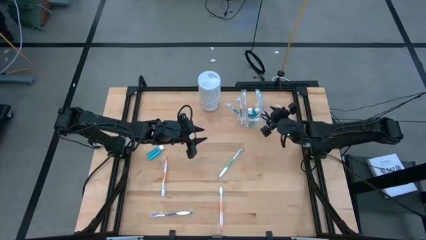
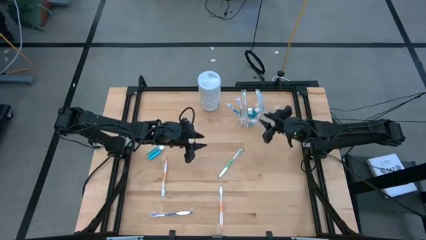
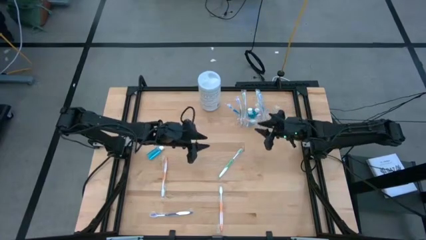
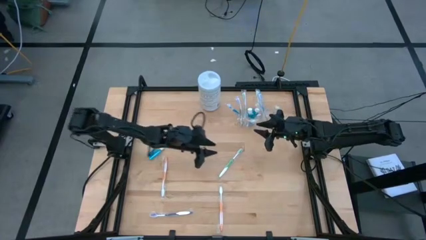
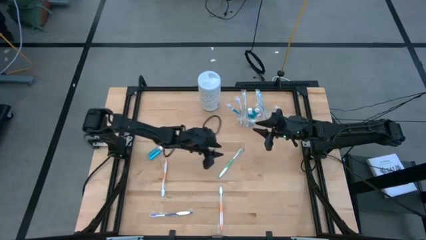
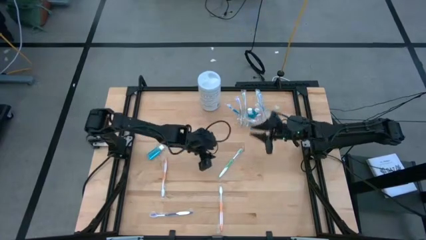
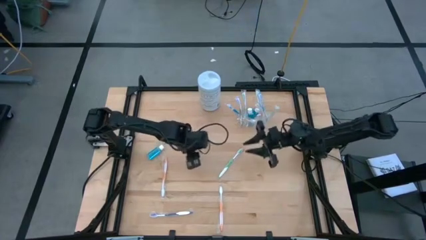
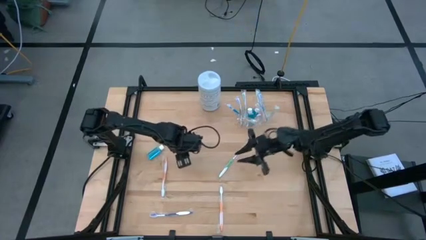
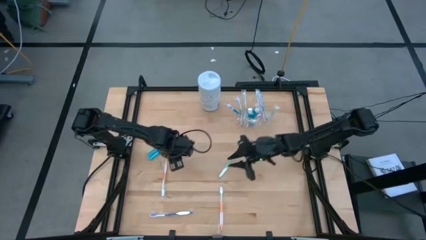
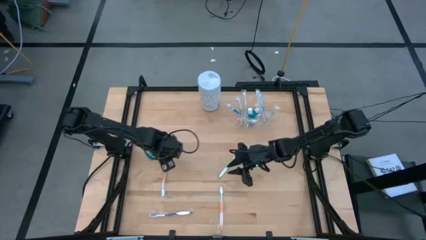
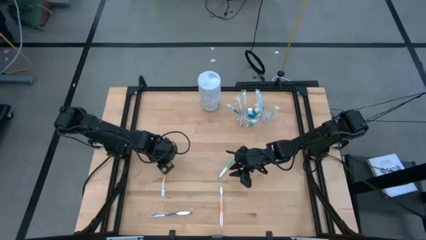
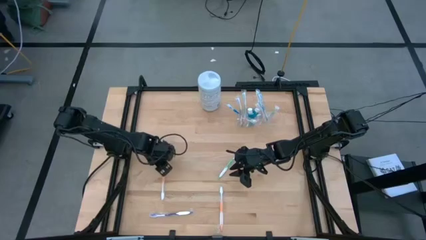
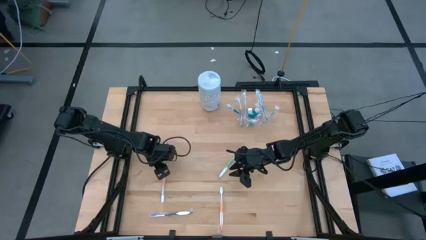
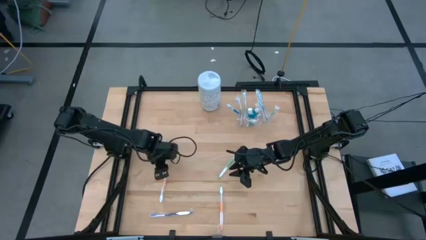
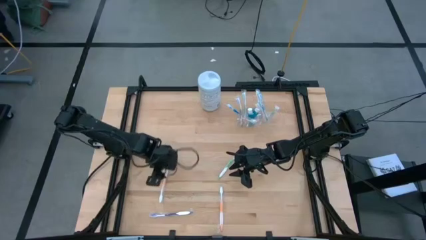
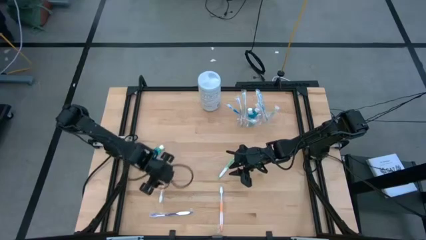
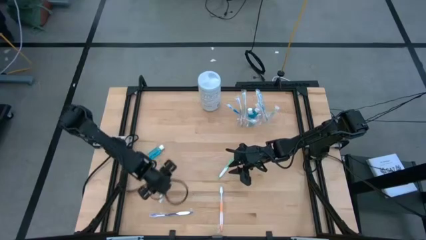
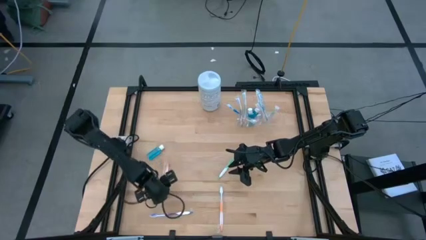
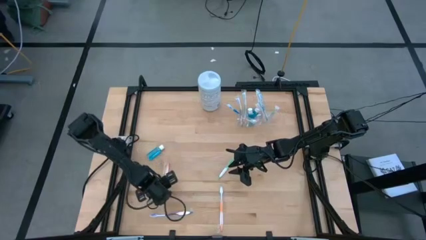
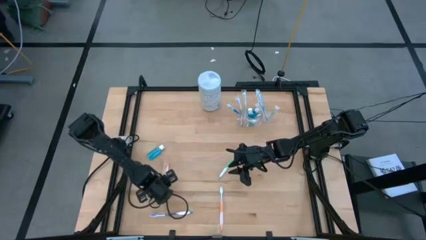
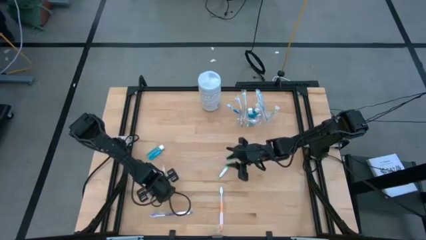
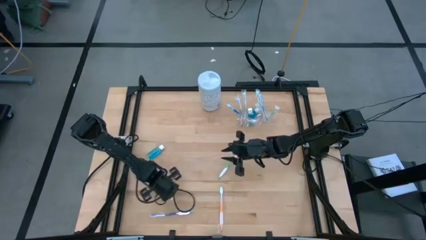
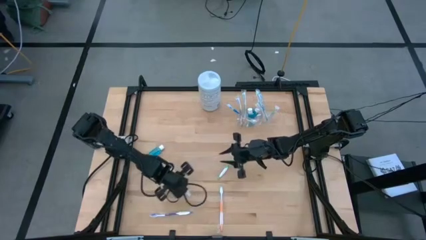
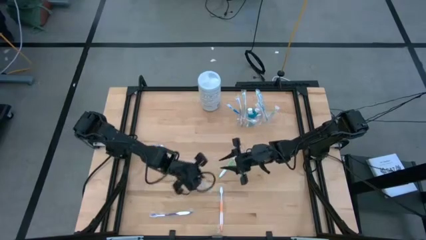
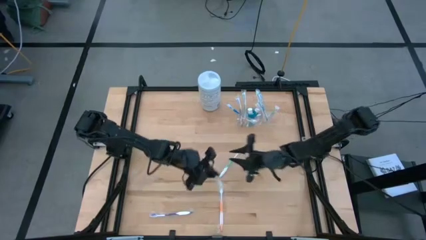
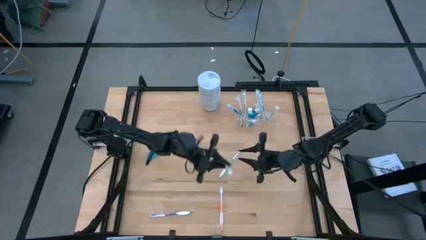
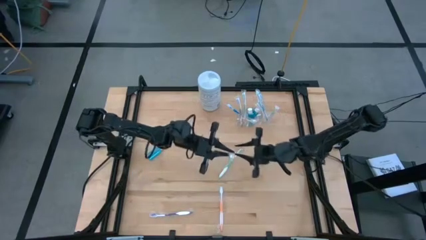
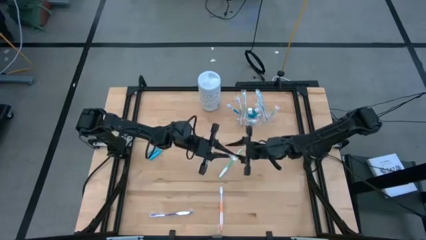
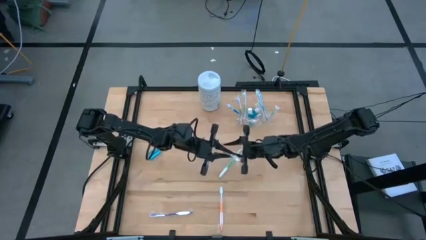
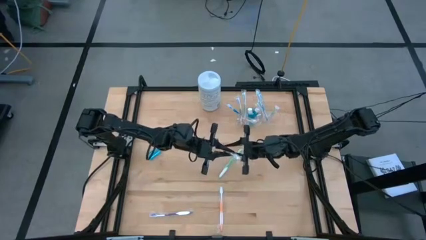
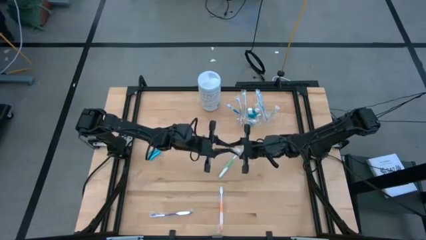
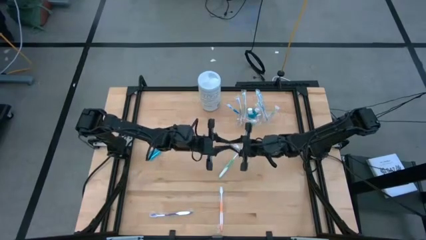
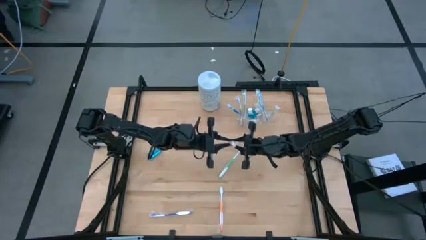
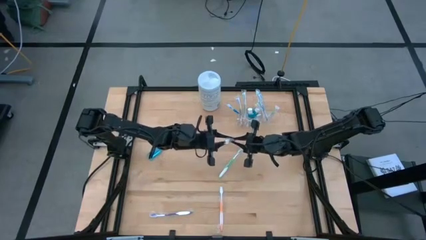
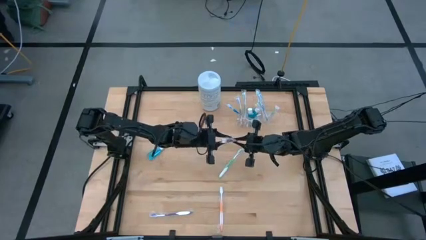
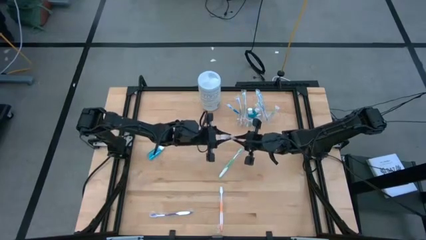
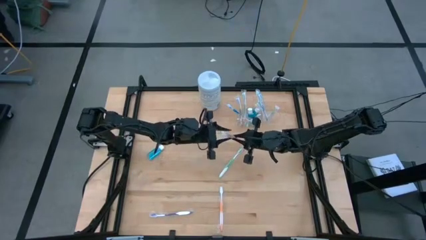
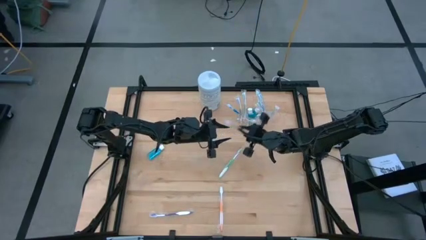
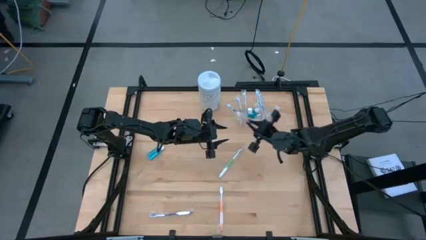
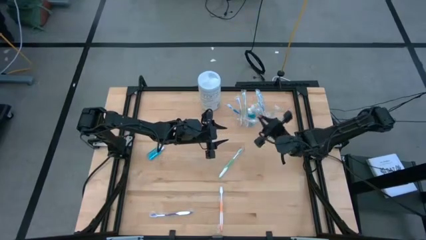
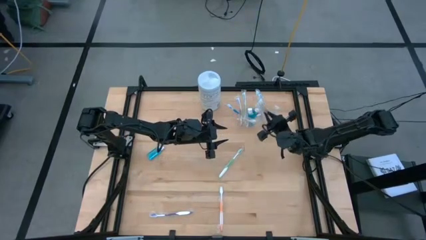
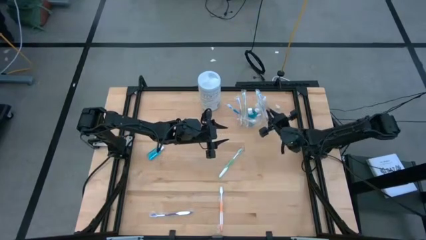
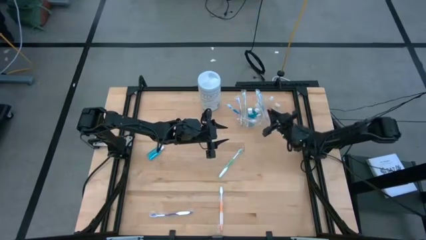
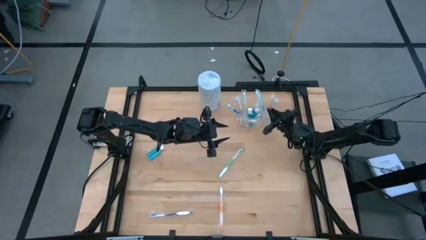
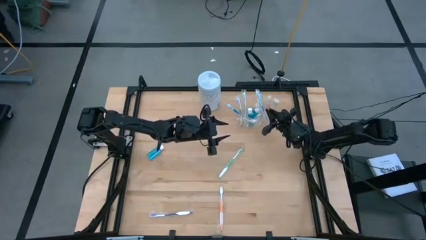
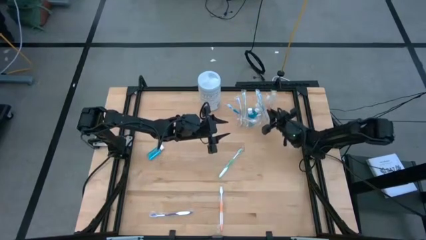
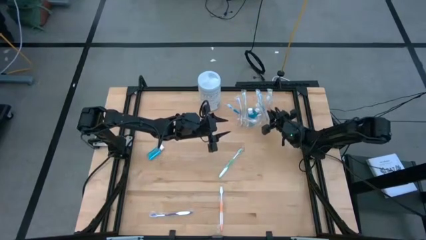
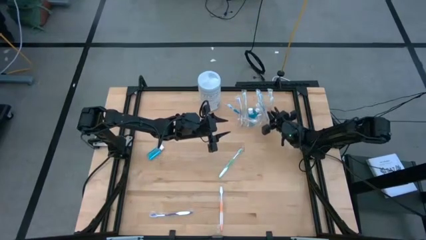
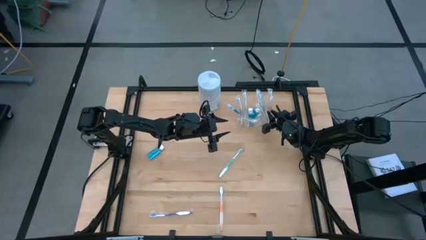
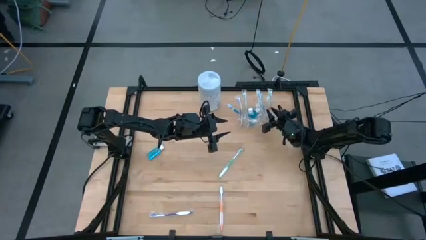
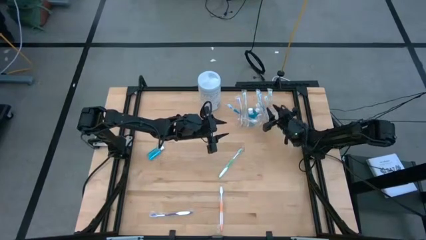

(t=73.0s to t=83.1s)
Task: Pick & Place toothbrushing station
Put the white and orange toothbrush into the transparent mesh organizer

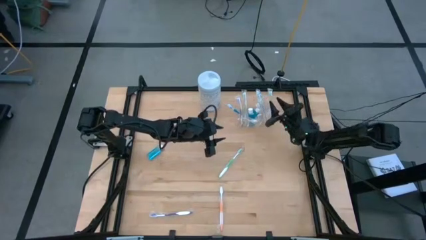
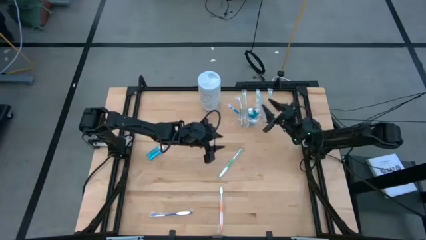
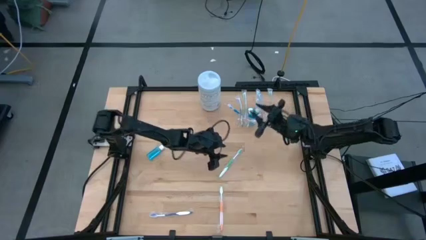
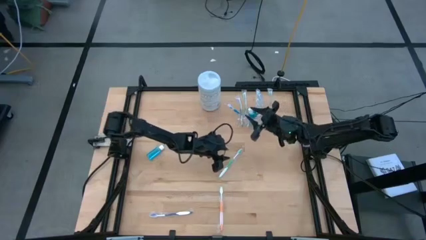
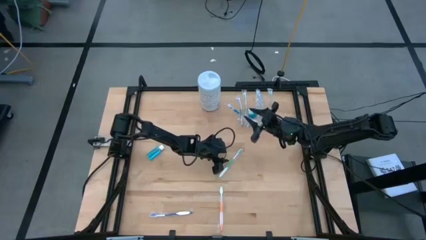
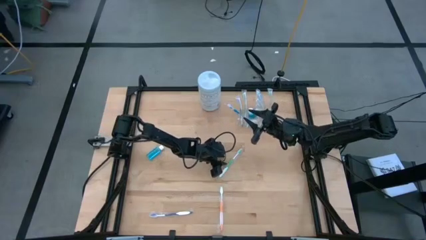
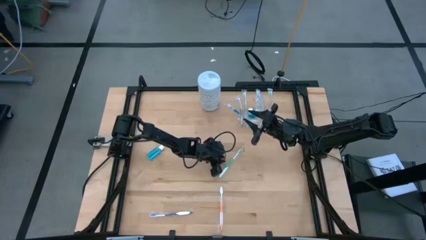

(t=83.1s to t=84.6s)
Put the white and green toothbrush into the transparent mesh organizer

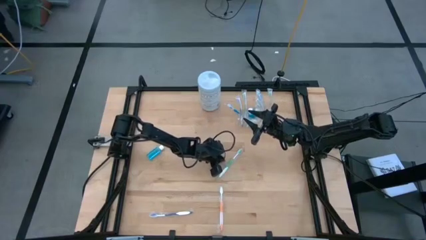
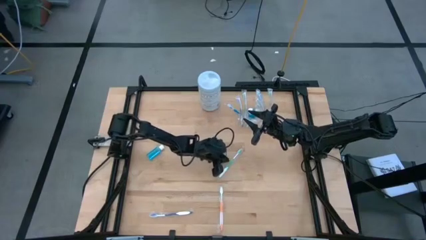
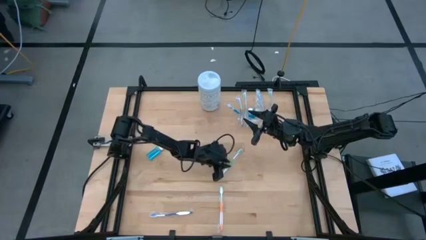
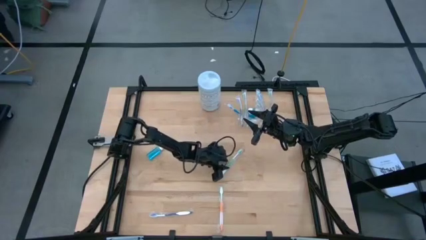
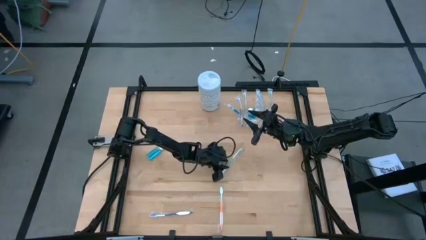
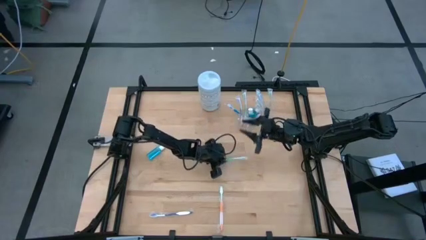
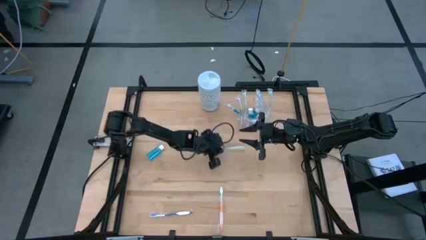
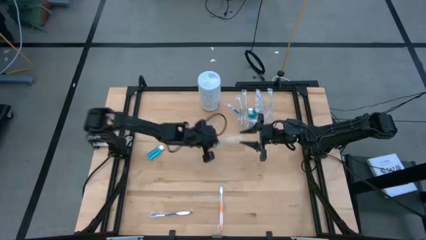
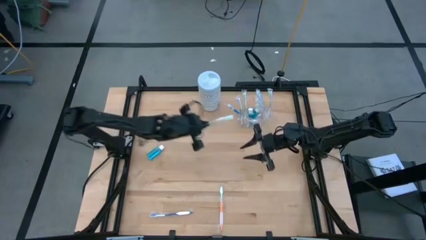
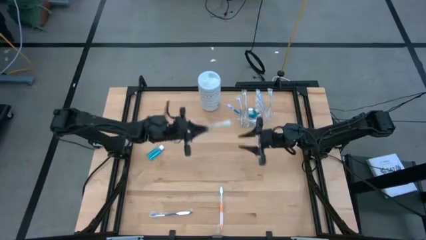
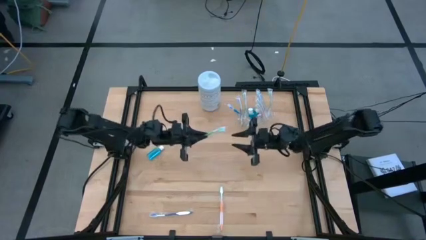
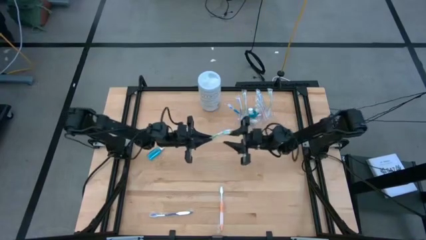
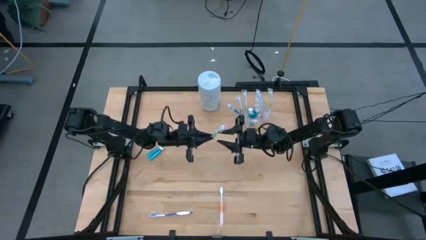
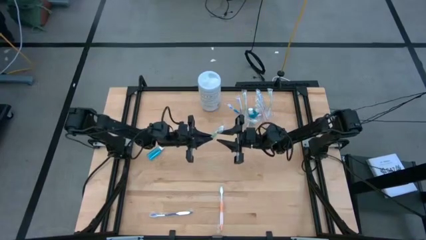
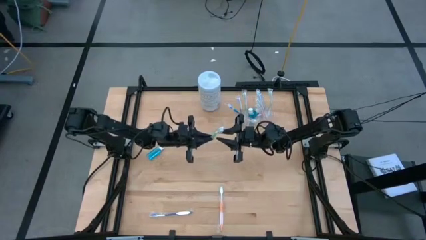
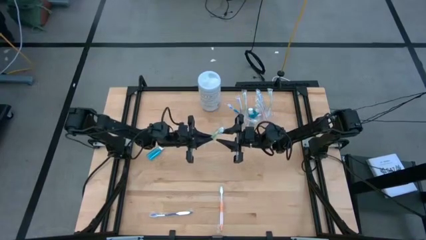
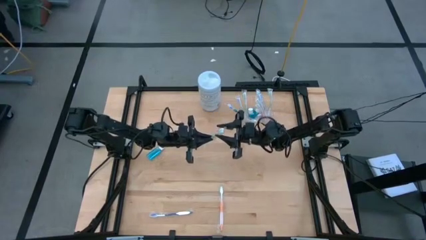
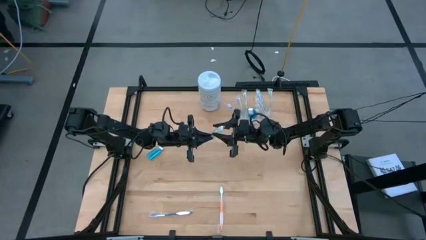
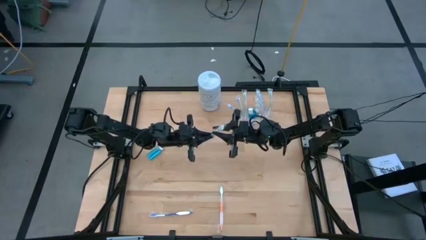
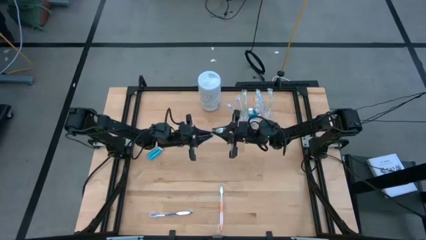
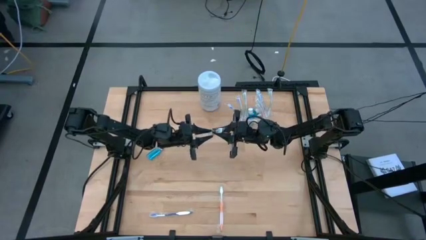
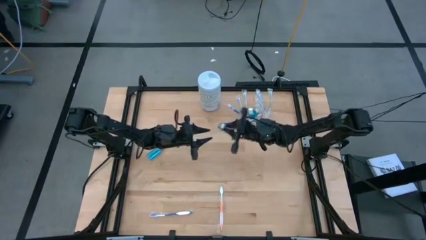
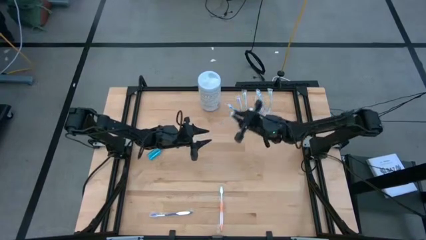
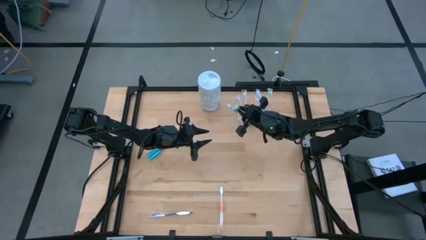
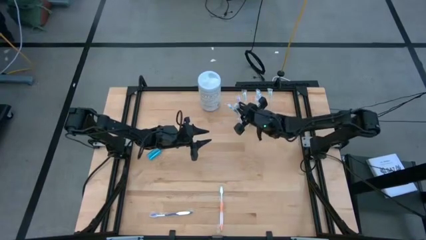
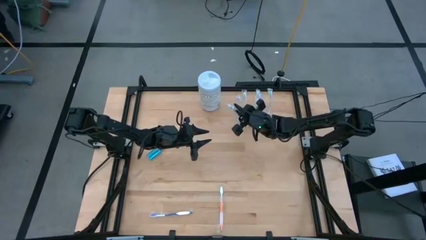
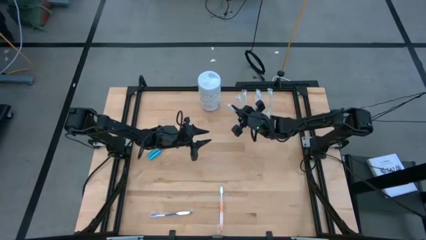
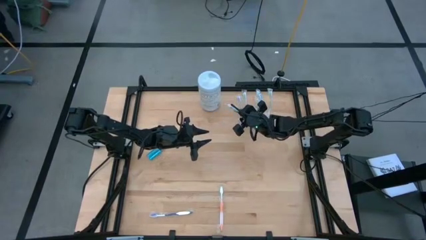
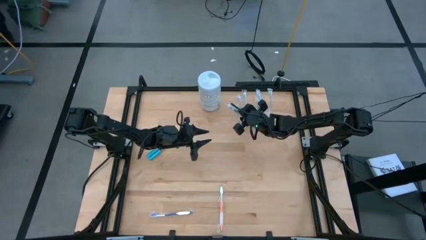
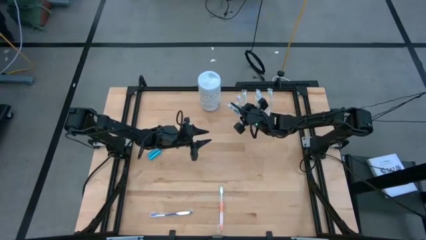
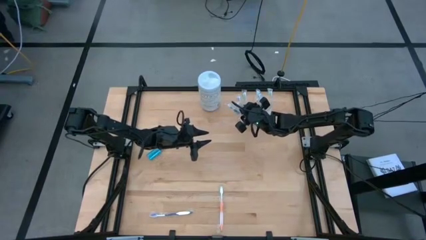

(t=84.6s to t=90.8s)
Put the white and green toothbrush into the transparent mesh organizer
